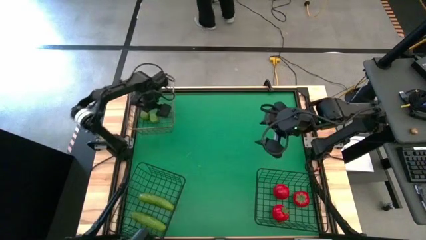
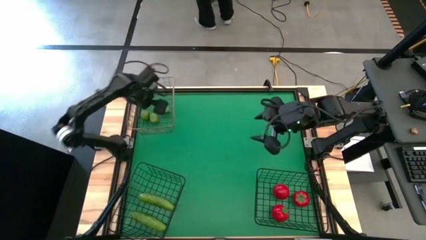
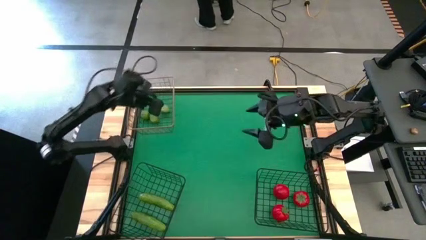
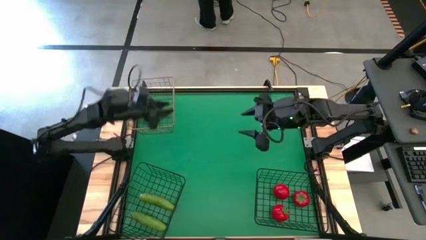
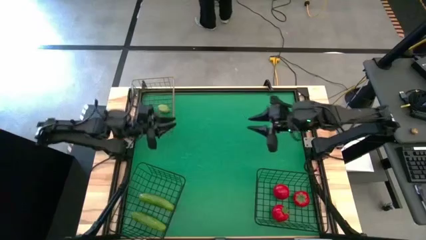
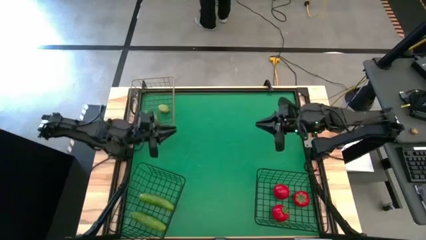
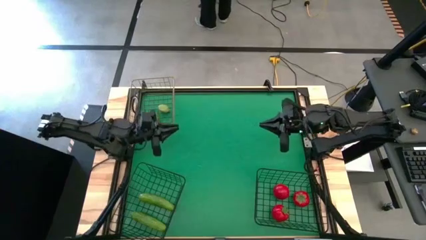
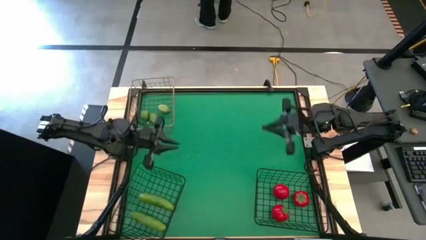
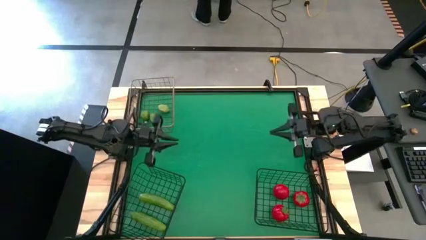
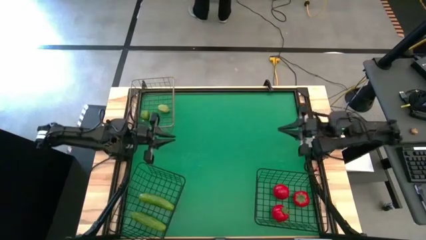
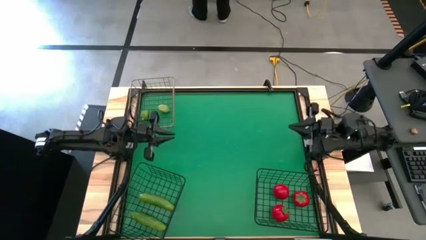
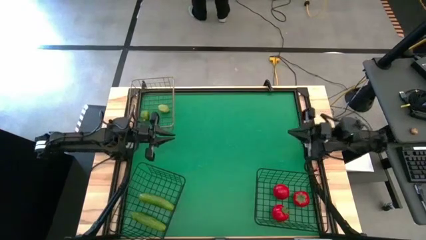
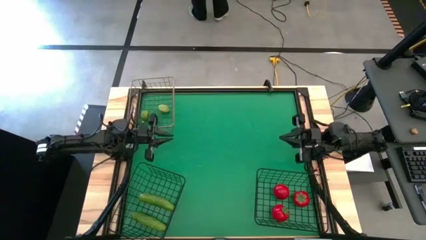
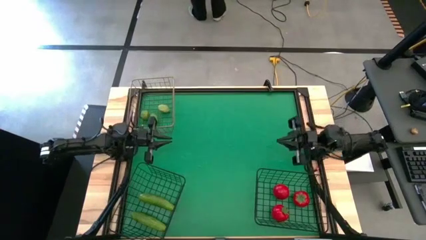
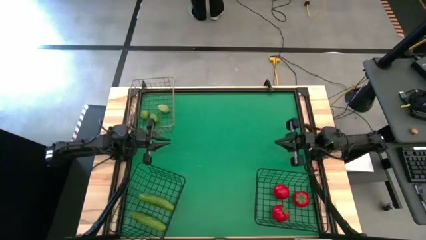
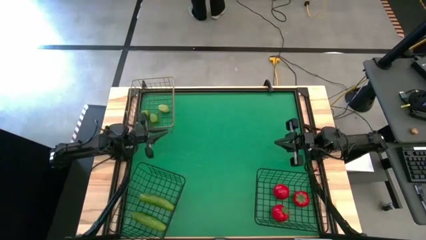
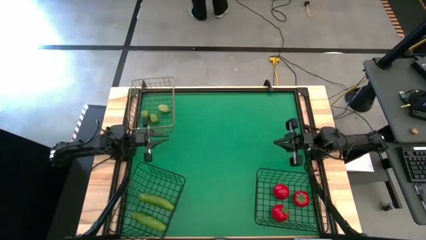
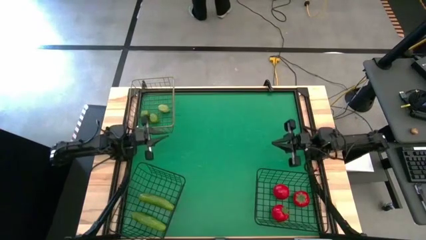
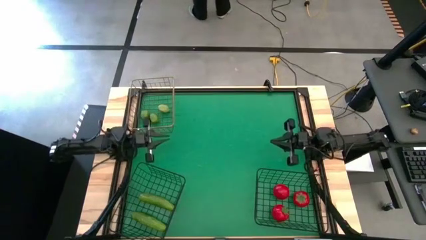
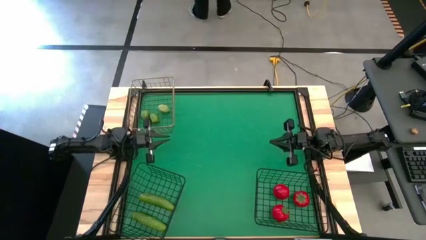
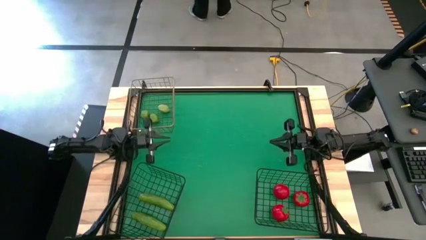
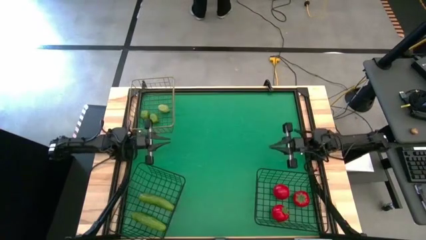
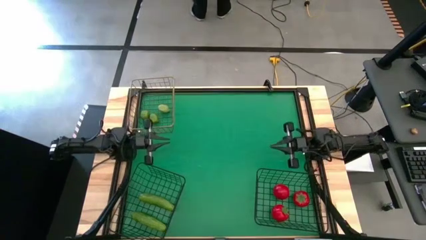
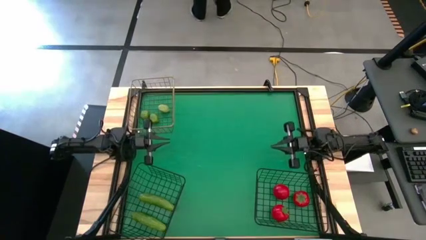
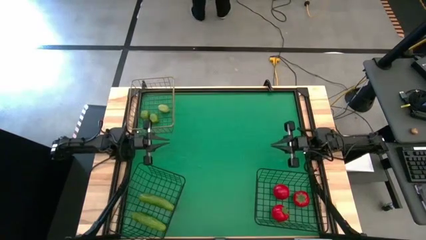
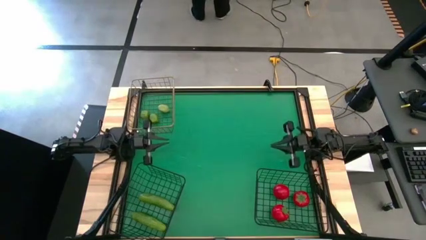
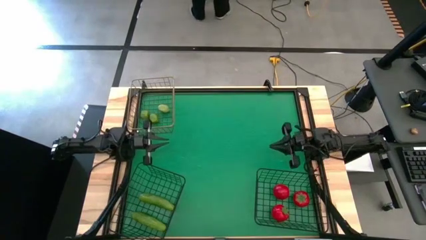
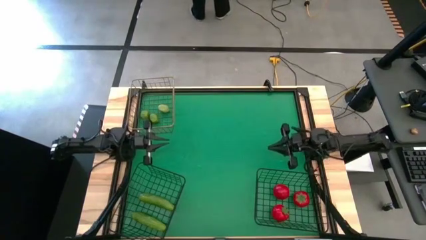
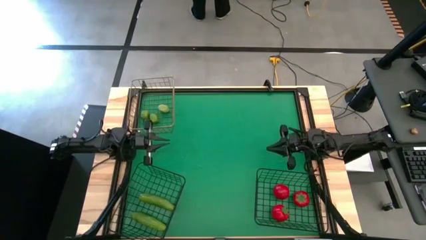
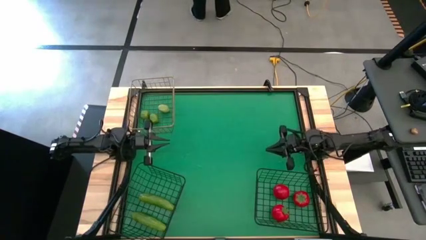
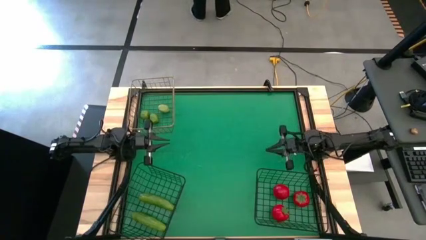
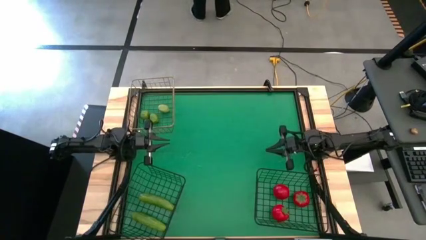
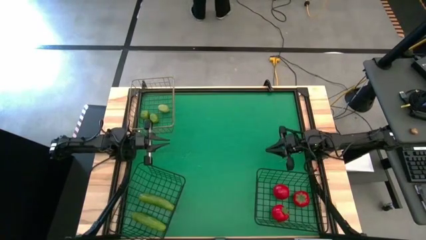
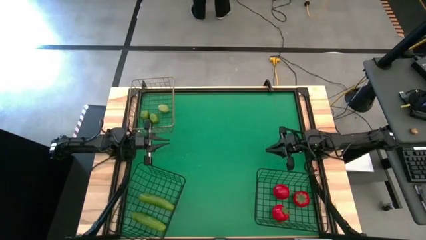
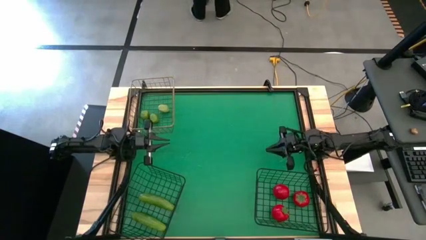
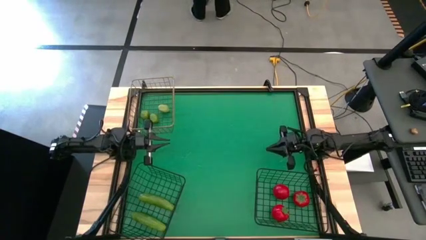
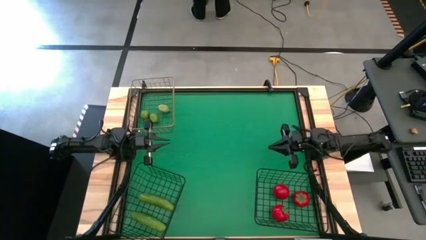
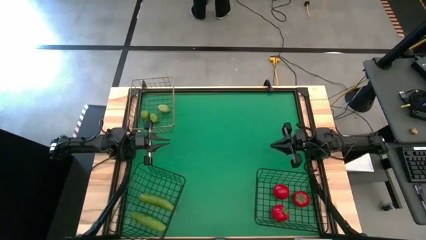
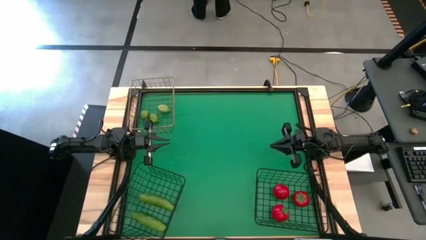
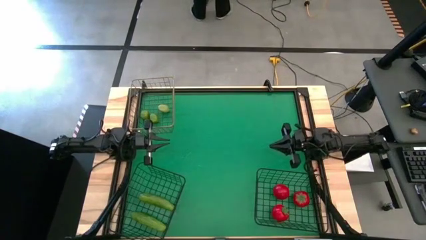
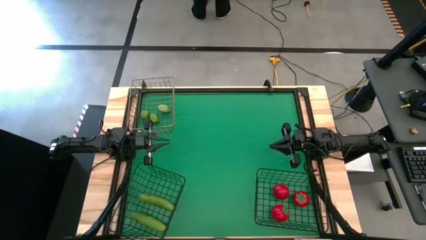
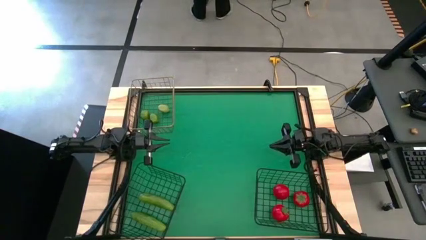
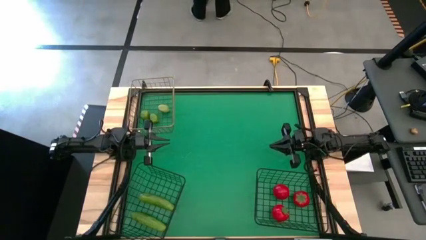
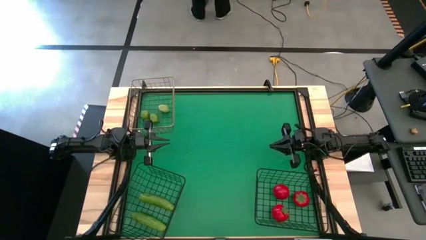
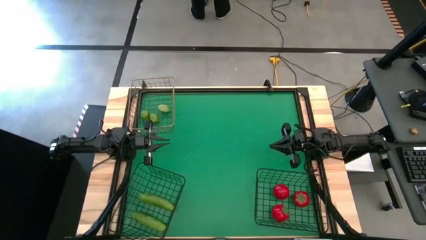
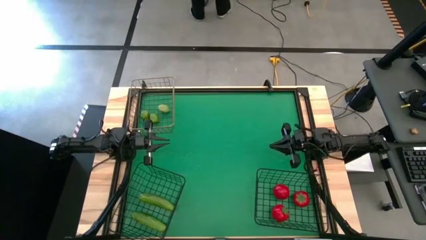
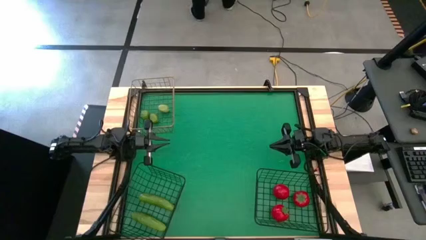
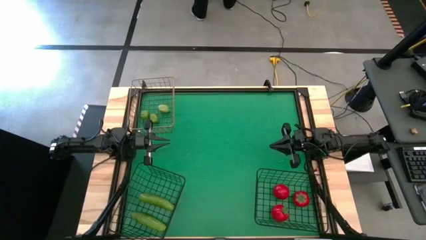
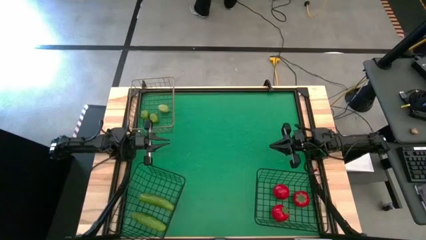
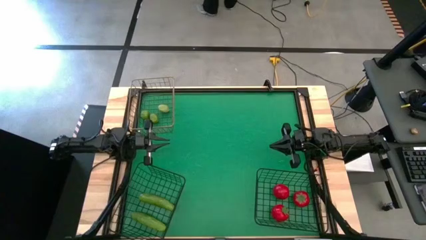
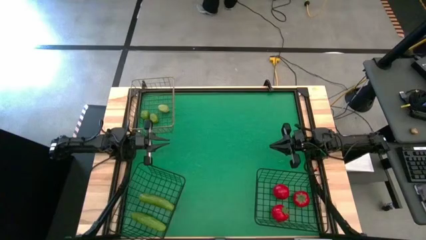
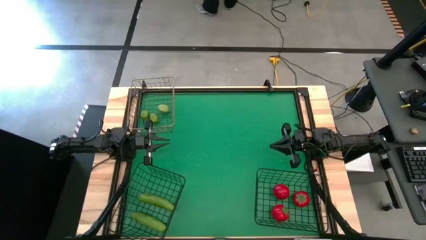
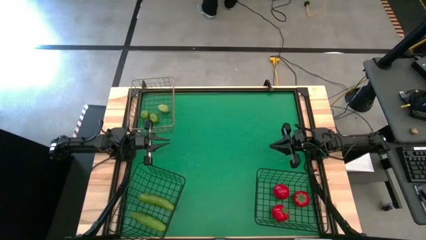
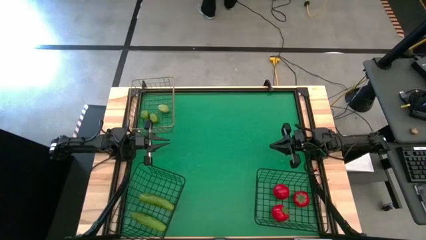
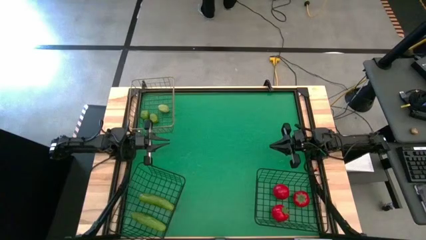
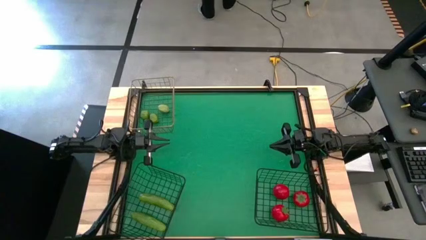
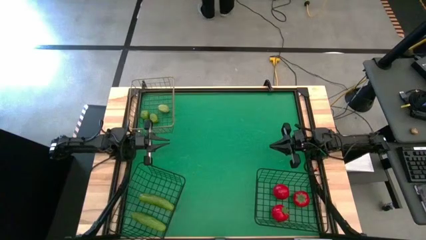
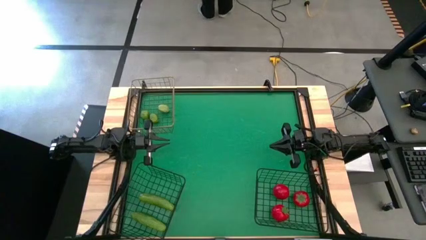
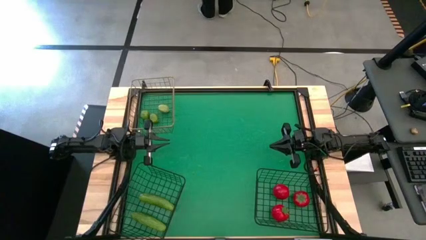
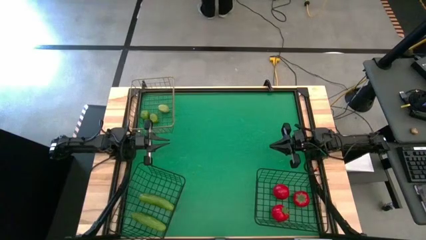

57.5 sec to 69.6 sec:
Task: Sort produce into baskets
Return to Home Position
